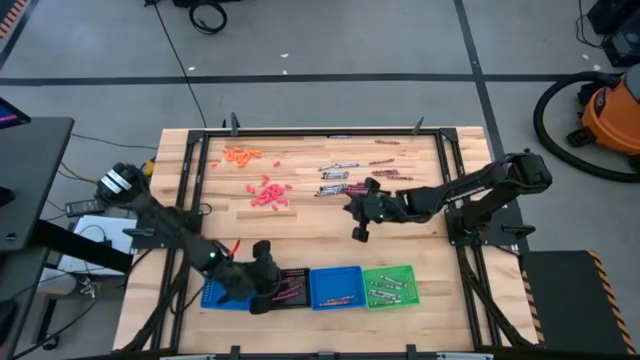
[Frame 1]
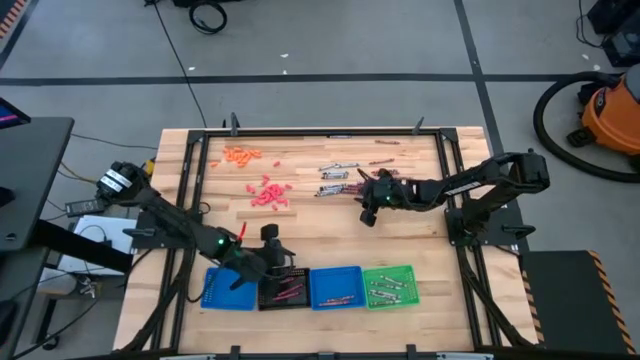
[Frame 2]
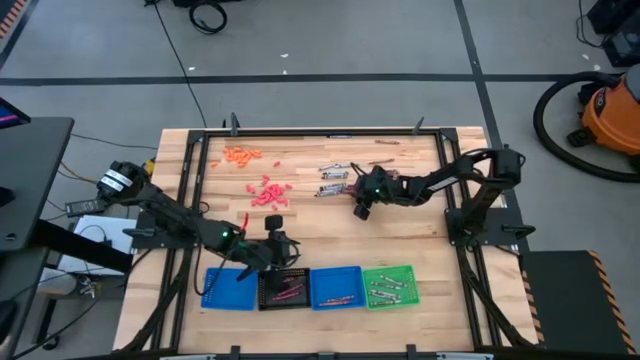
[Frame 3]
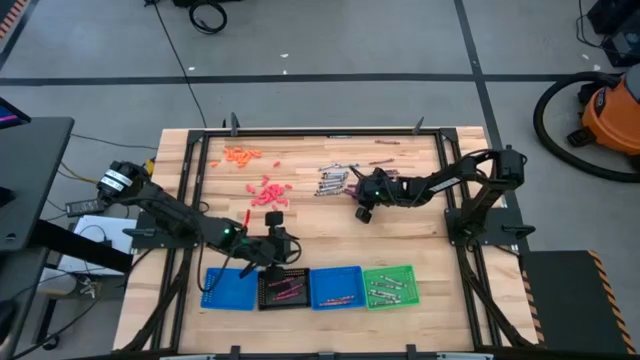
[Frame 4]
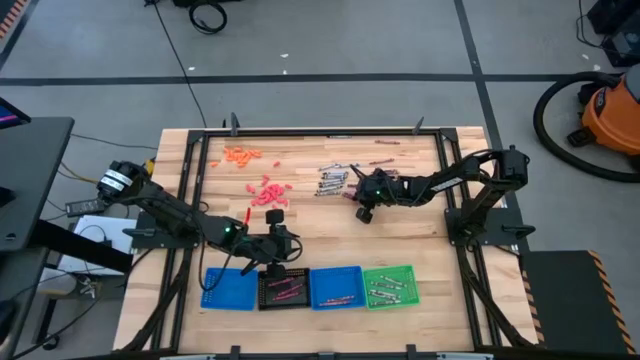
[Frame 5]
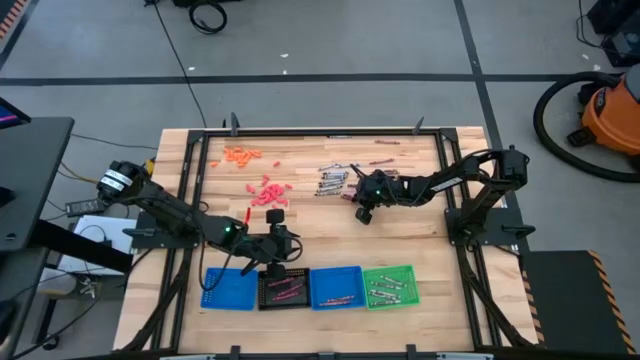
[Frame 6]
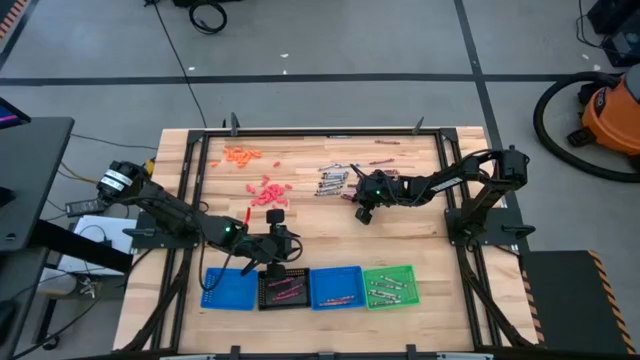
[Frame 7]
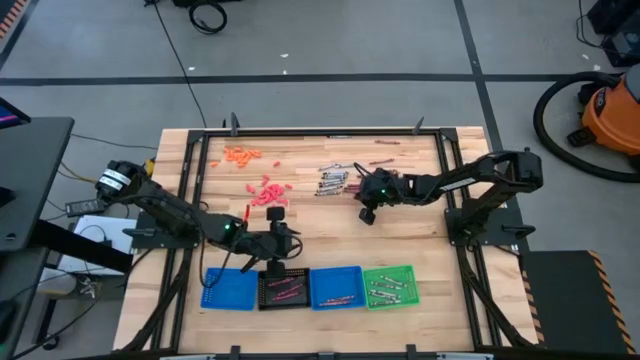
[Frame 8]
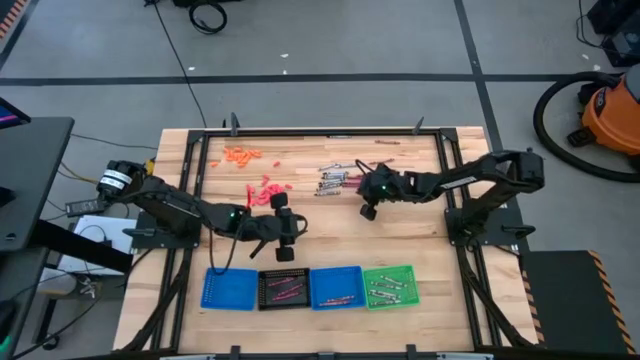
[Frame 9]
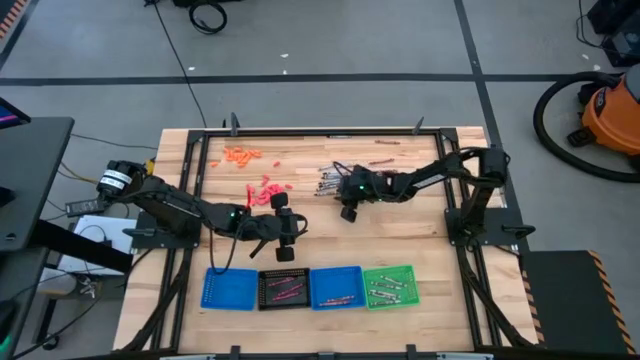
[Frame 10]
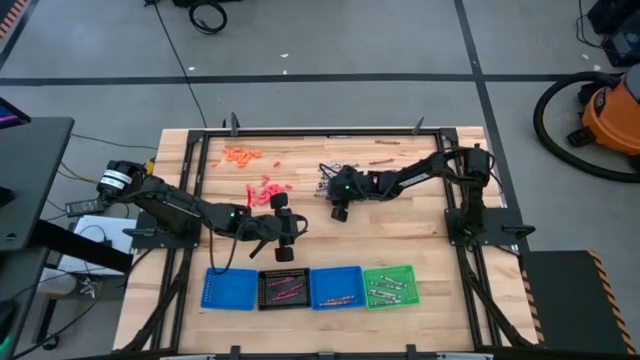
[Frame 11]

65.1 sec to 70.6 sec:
Task: Sort crayons
Put the black crayon into the left blue bin

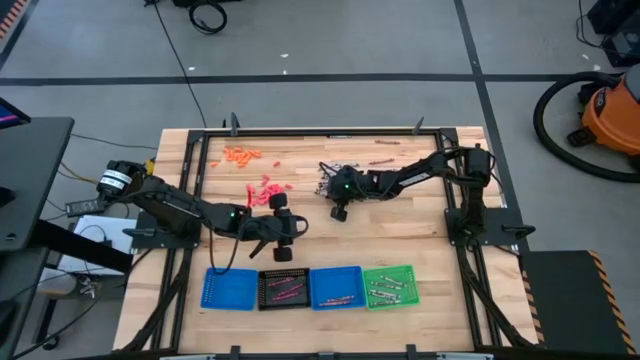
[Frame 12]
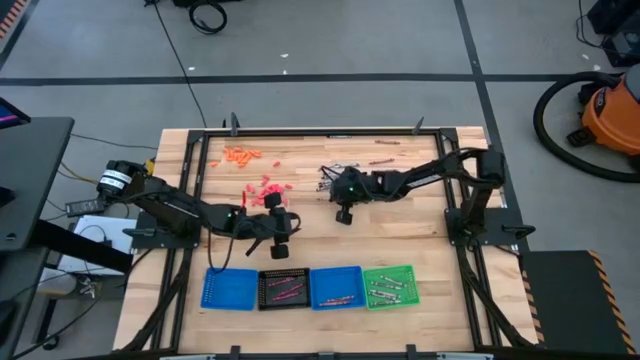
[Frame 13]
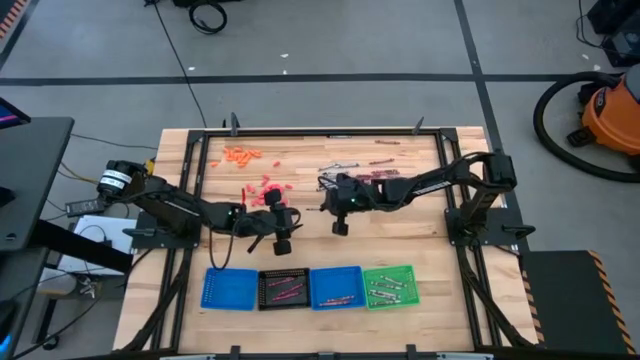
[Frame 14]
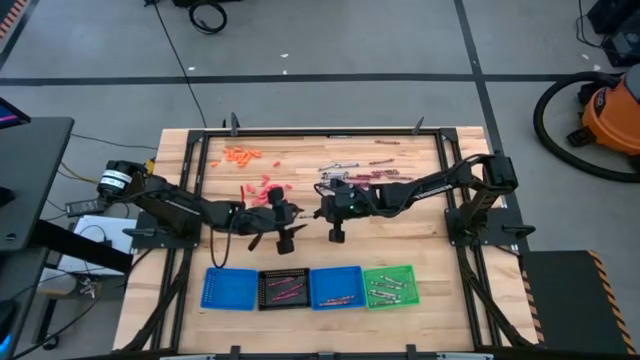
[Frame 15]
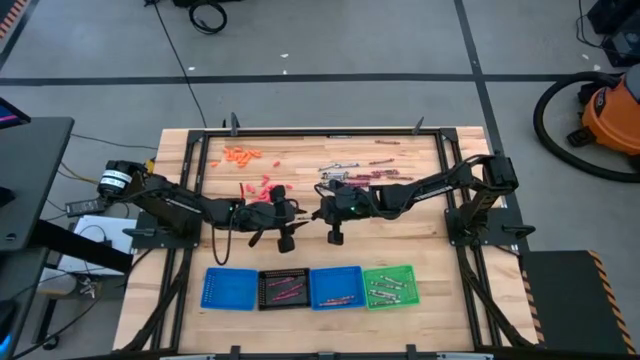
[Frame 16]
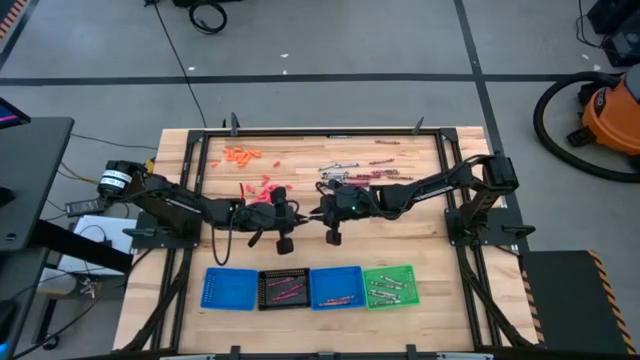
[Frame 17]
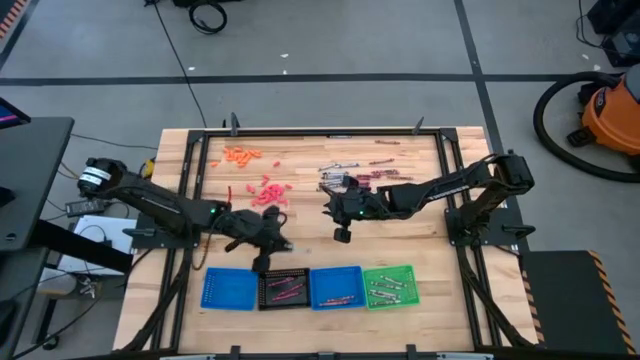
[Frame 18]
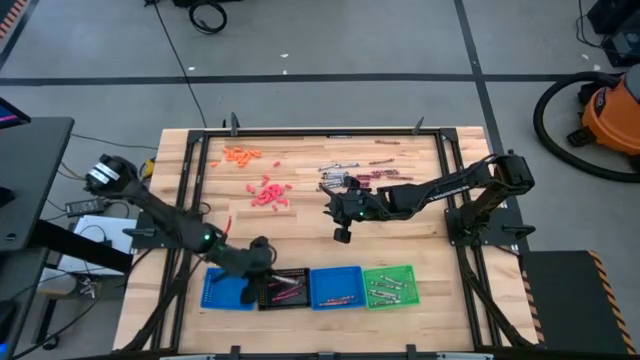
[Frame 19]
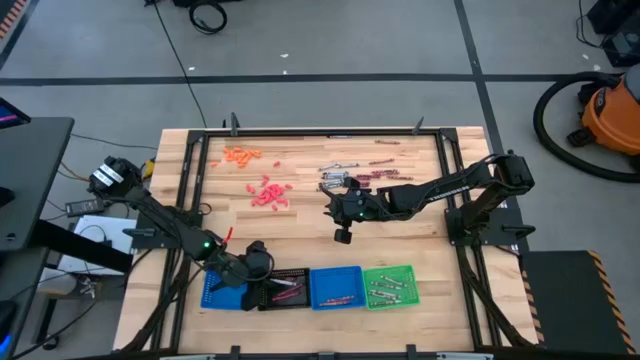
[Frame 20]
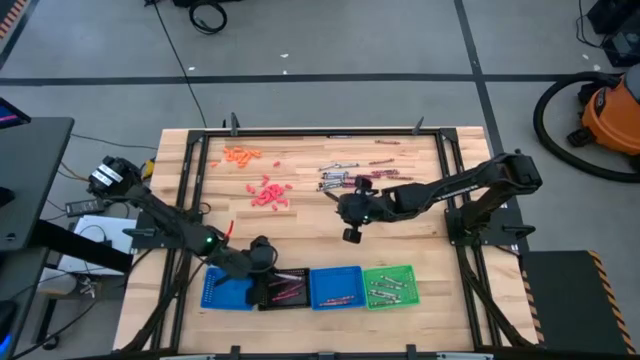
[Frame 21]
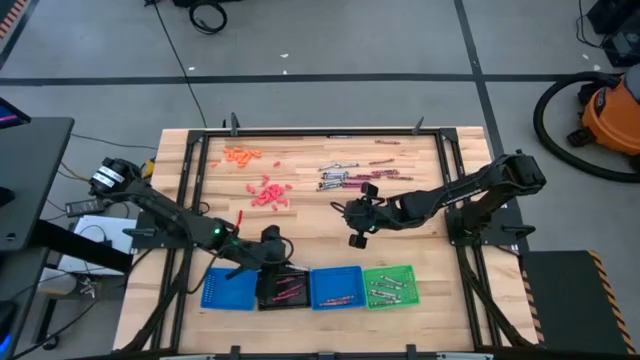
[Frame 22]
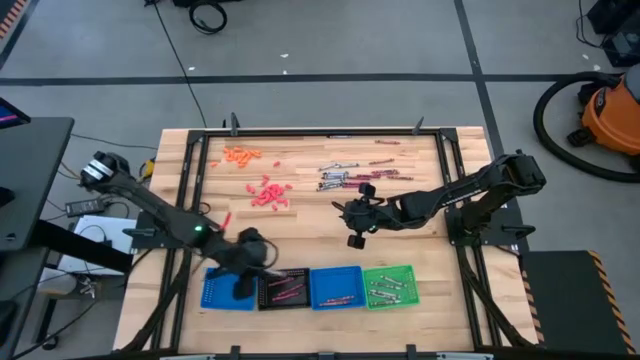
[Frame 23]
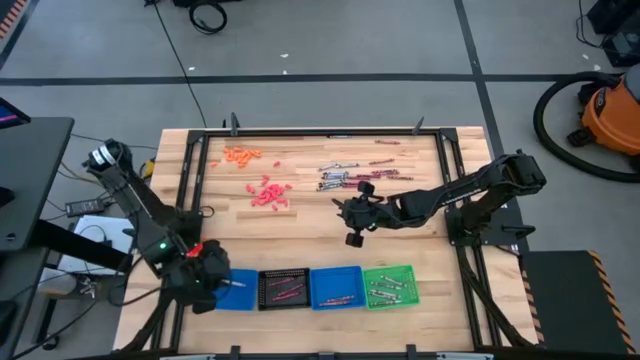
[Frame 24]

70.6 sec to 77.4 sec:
Put the black crayon into the left blue bin

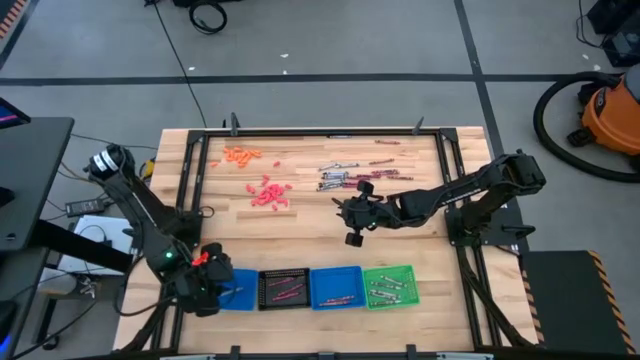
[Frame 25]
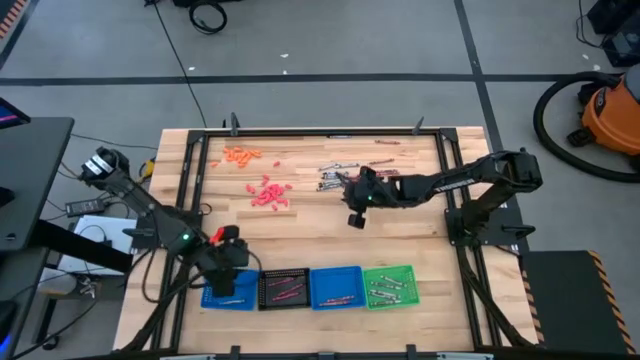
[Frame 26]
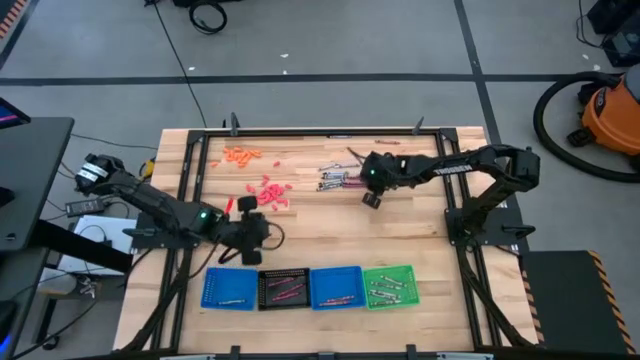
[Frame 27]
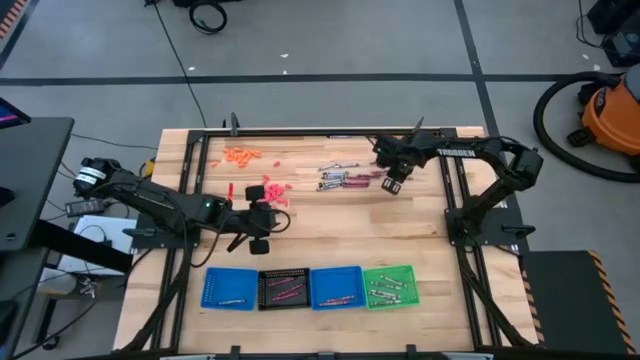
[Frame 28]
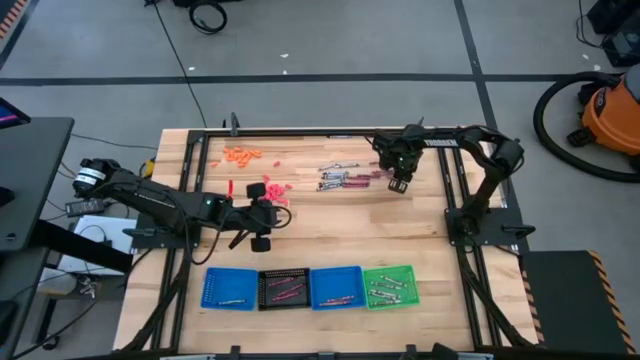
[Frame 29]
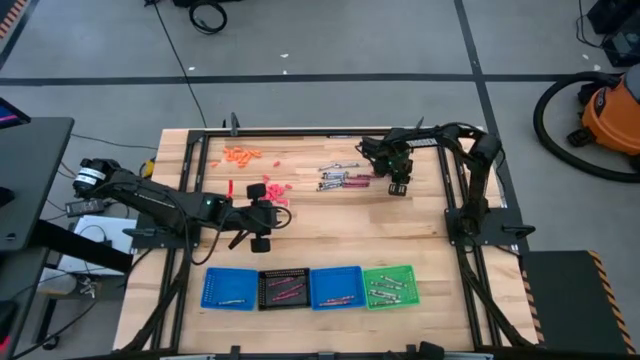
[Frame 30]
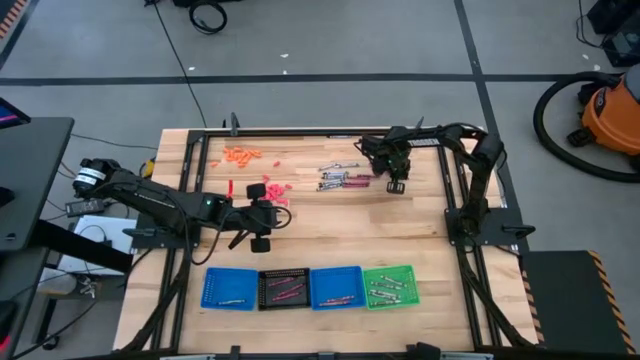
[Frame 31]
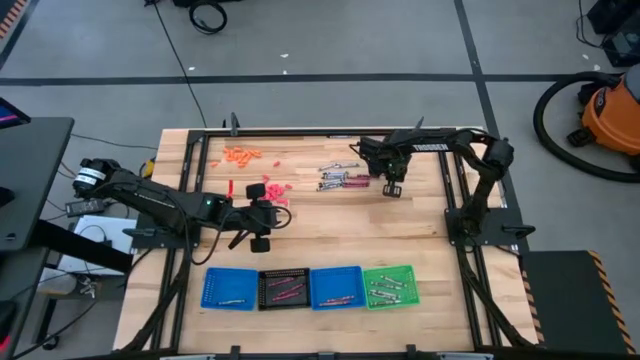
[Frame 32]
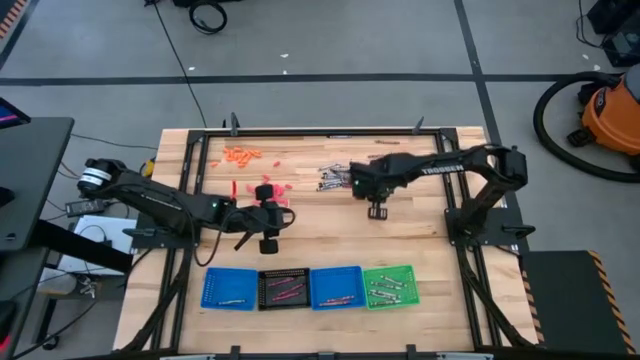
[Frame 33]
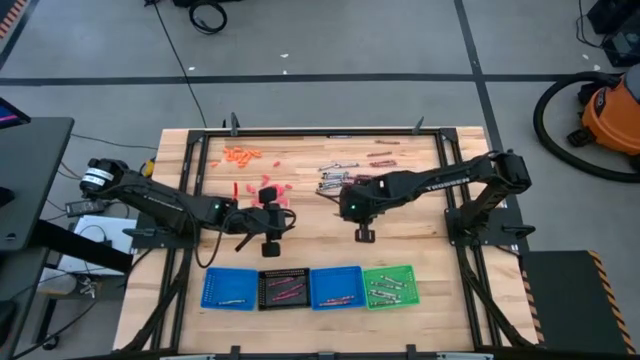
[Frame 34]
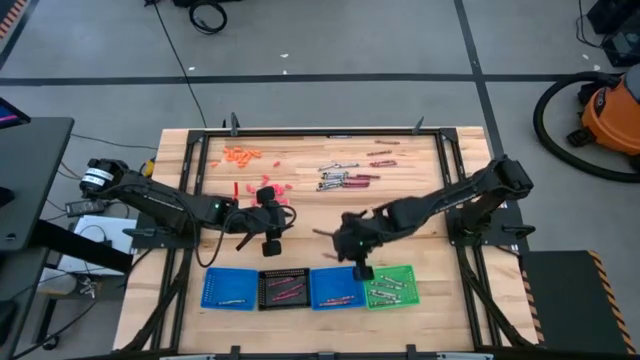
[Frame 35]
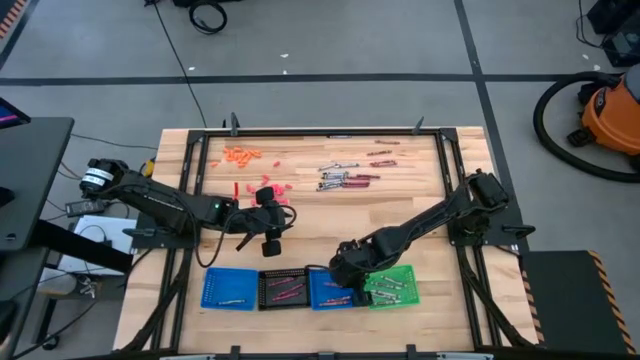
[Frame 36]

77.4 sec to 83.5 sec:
Put the pink crayon into the right blue bin

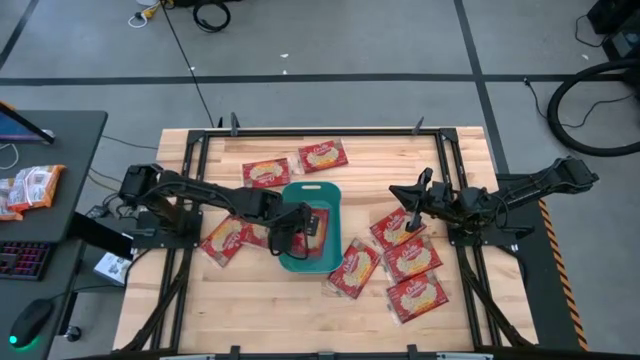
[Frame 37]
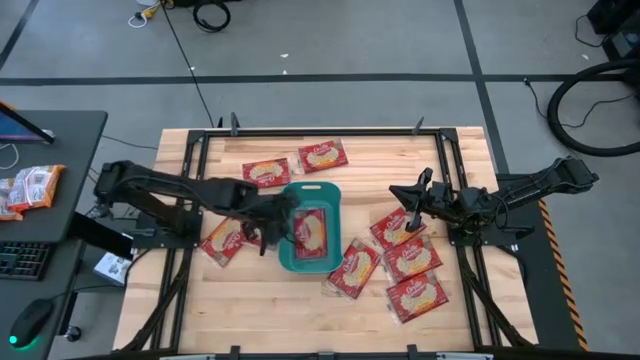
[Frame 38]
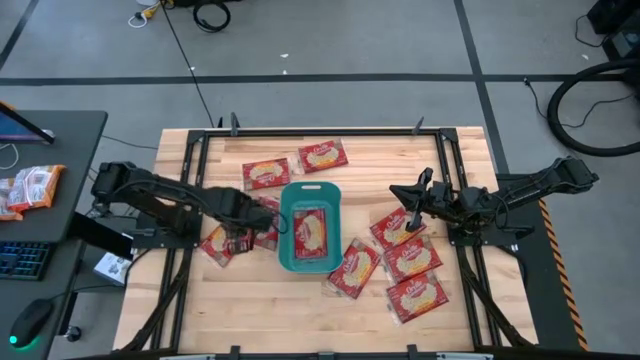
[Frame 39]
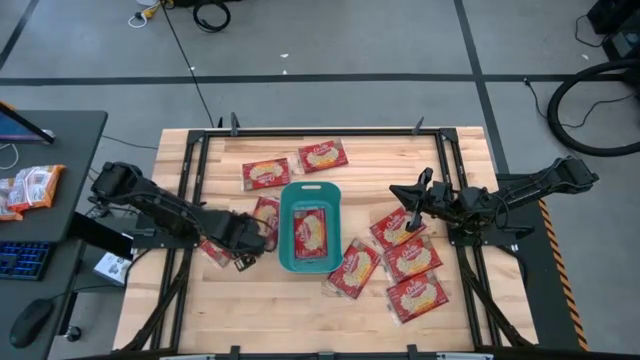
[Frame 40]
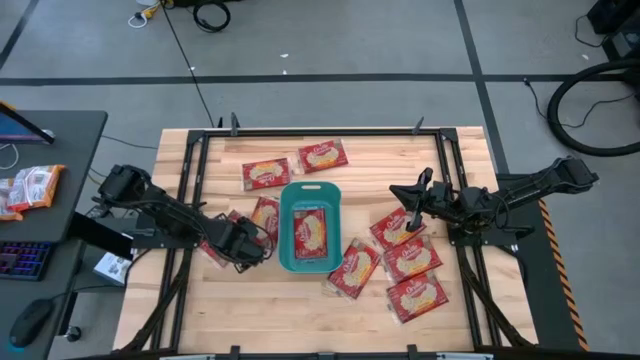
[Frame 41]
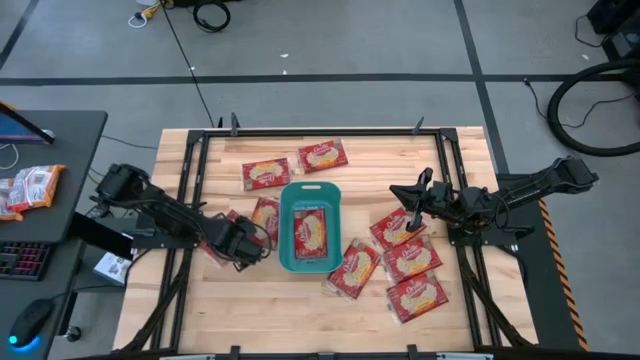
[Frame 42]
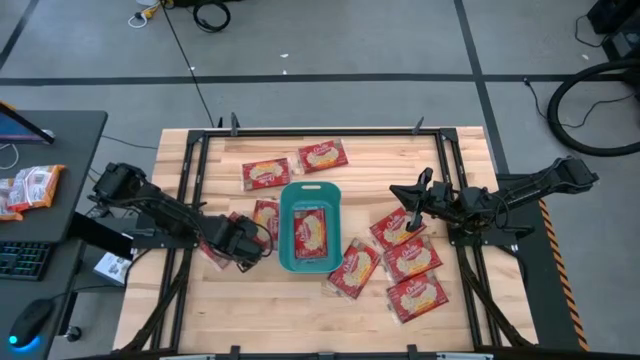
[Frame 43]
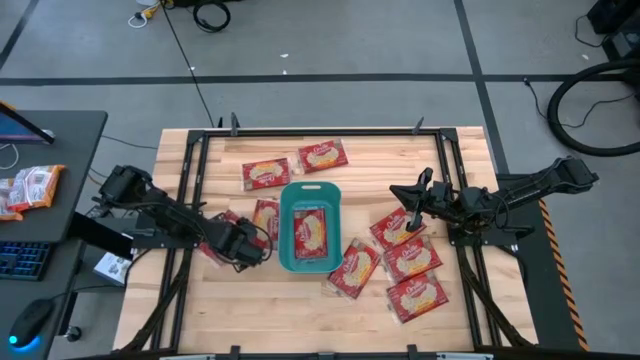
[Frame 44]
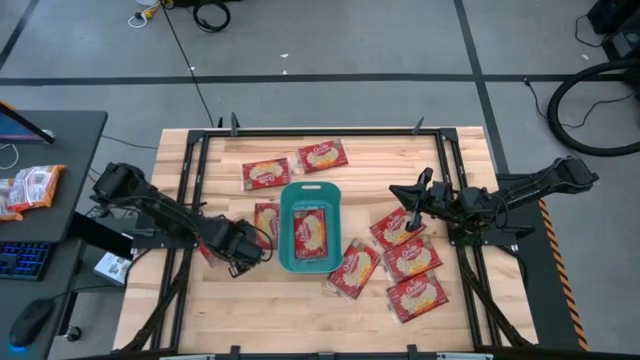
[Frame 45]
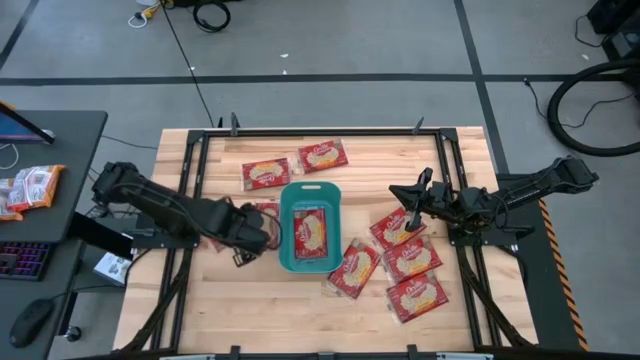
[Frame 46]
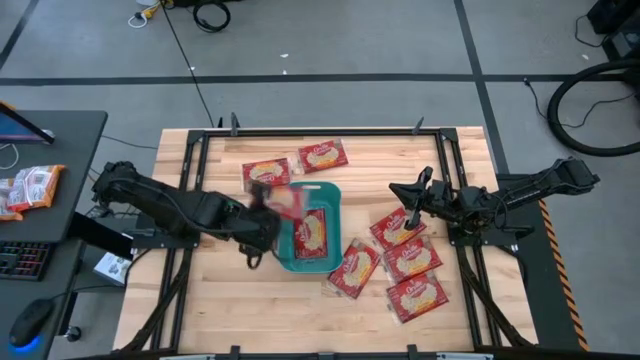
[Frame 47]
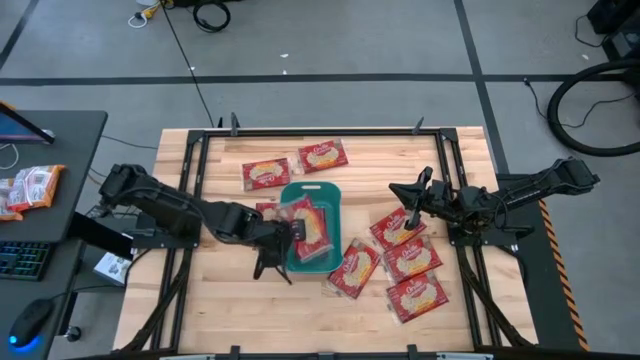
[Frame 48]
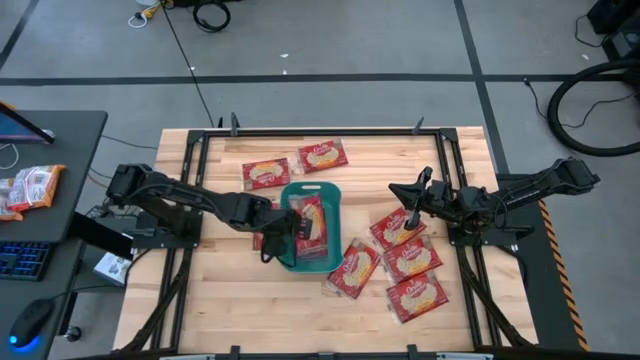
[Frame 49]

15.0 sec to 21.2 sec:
Task: Sort popcorn bags into baskets
Put the red popcorn bag into the green bin
